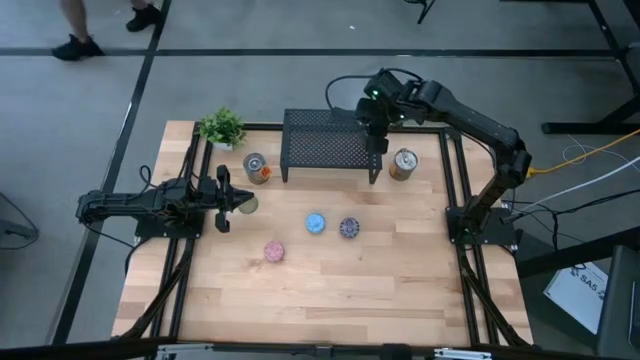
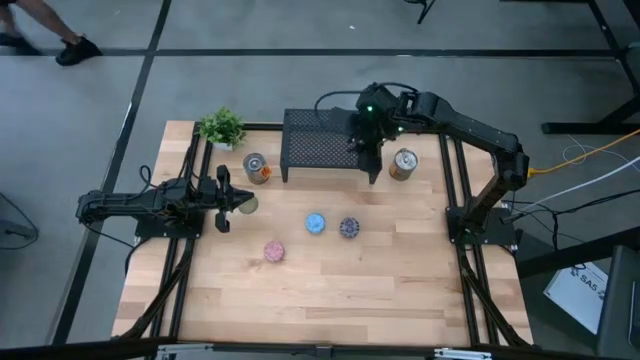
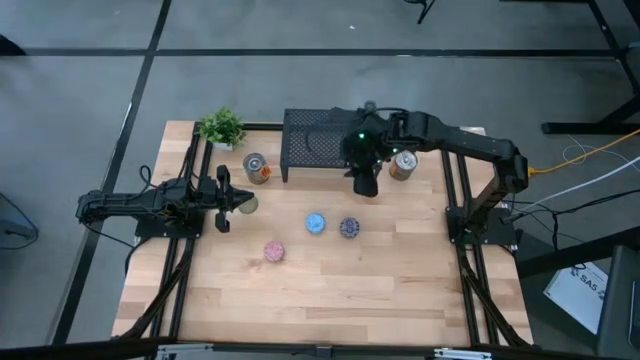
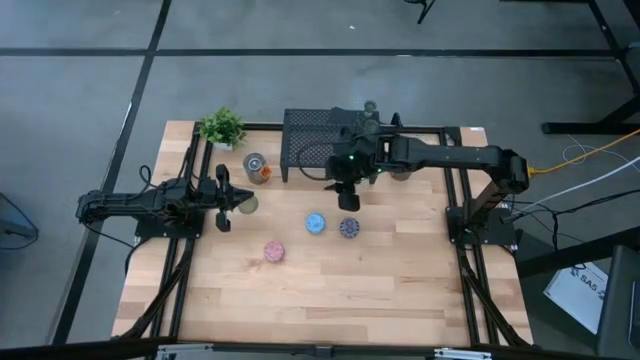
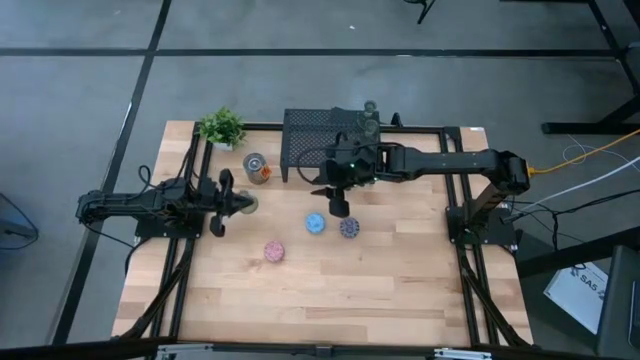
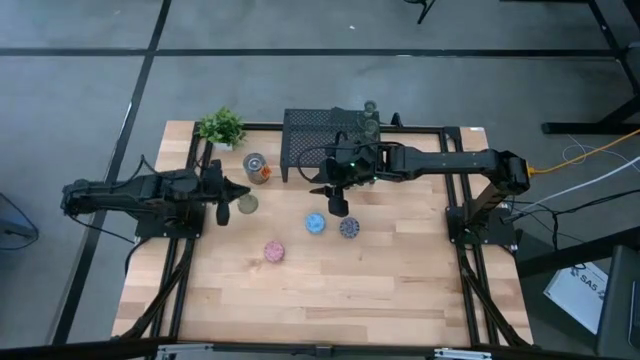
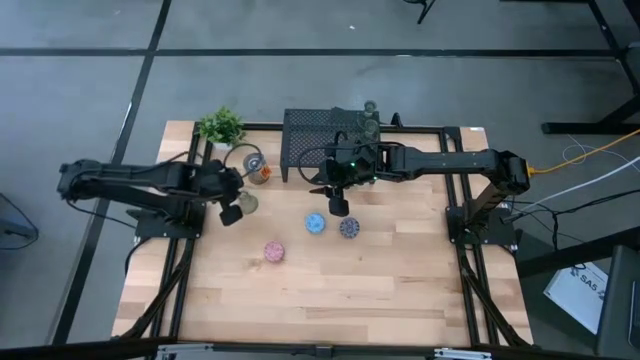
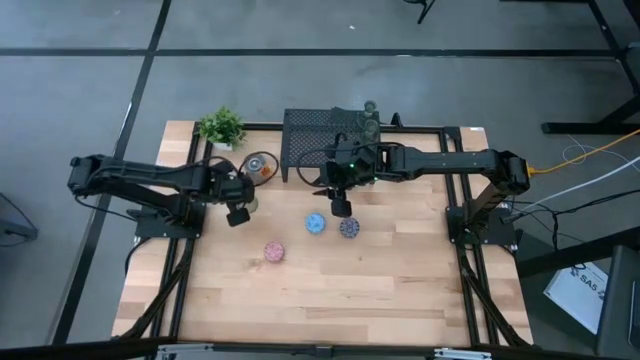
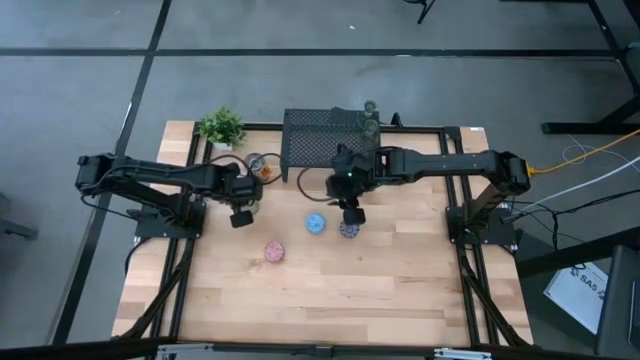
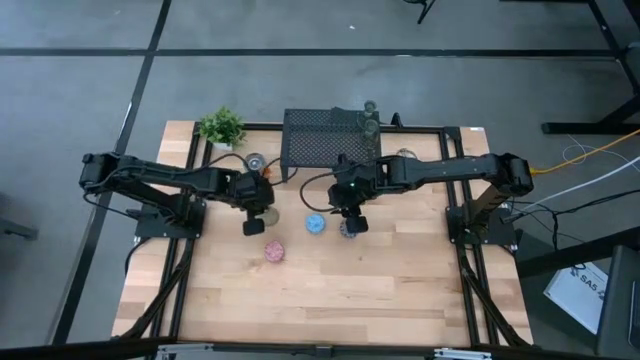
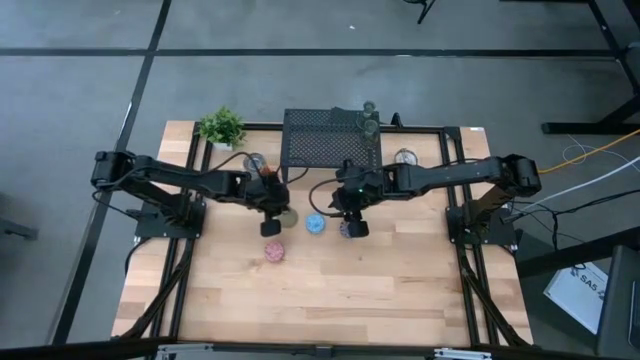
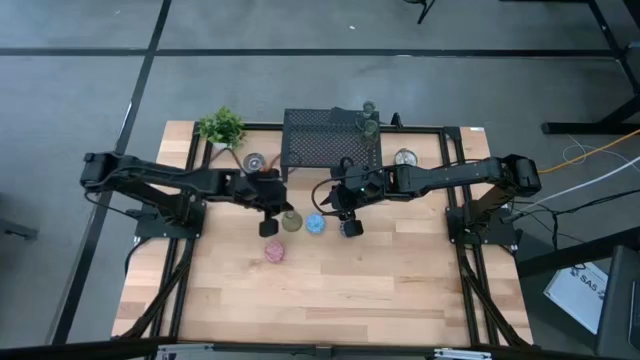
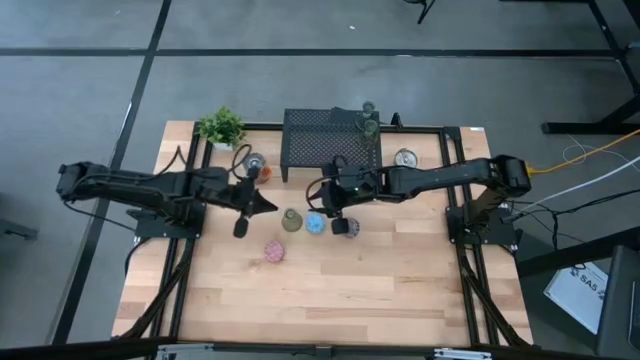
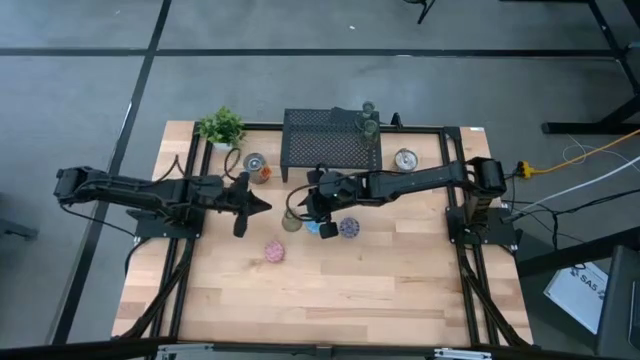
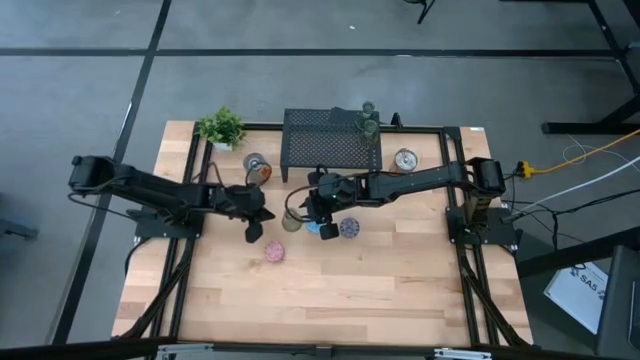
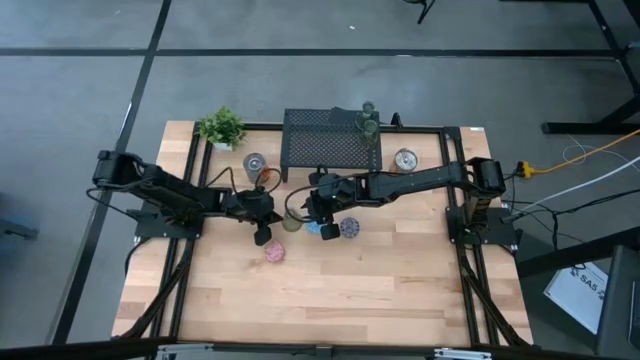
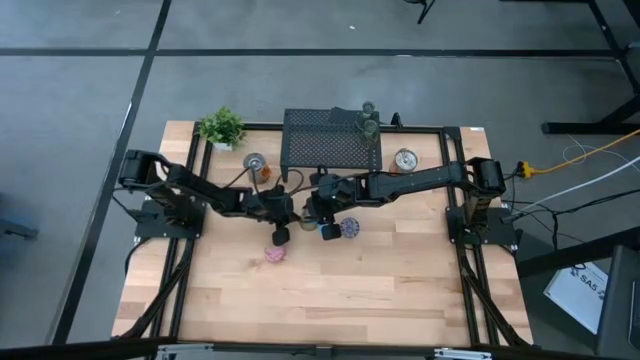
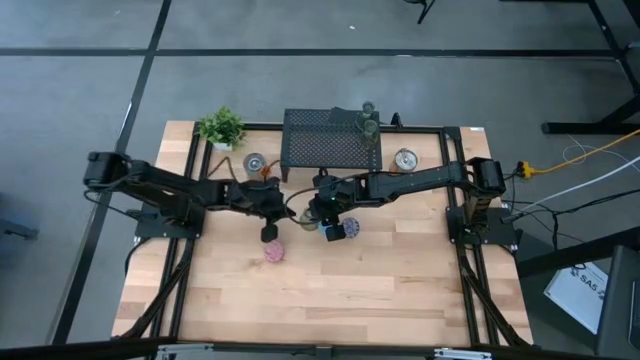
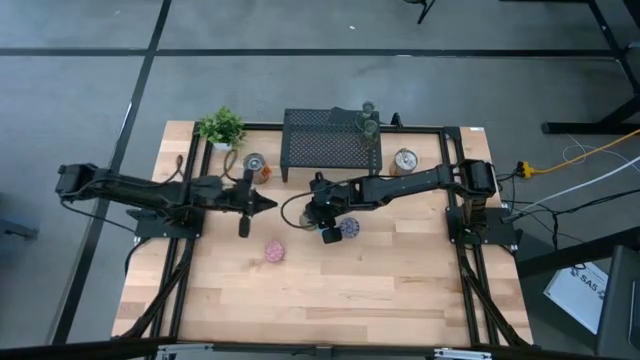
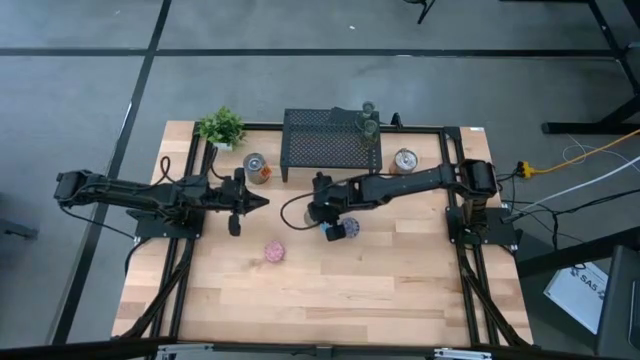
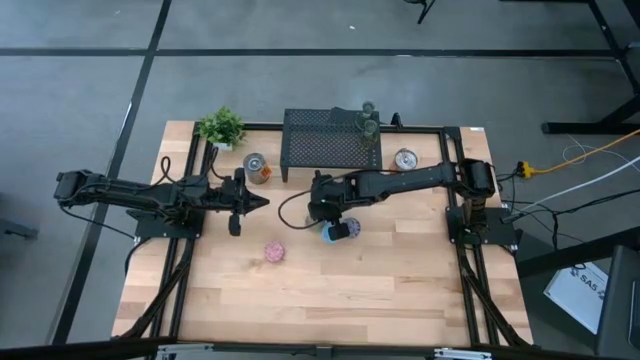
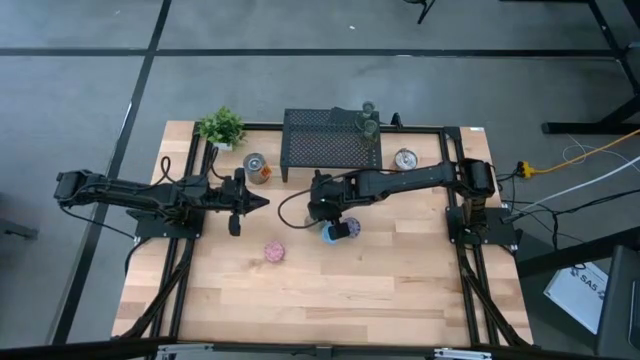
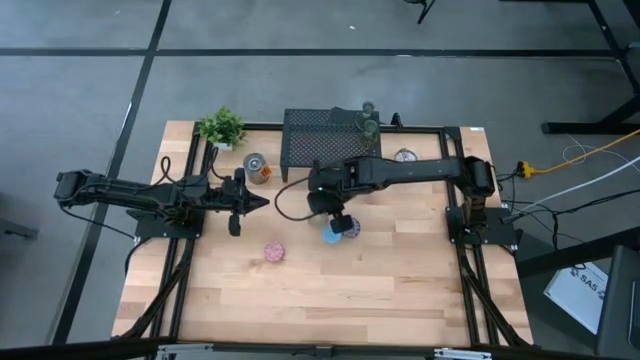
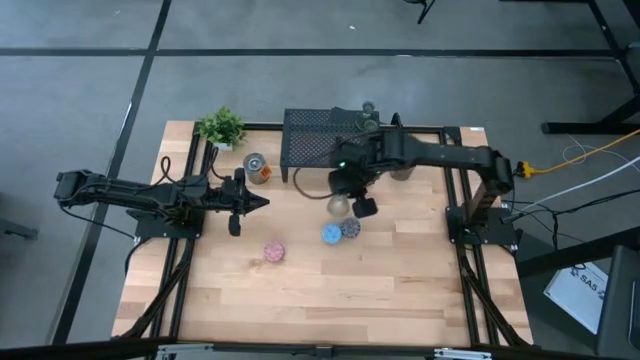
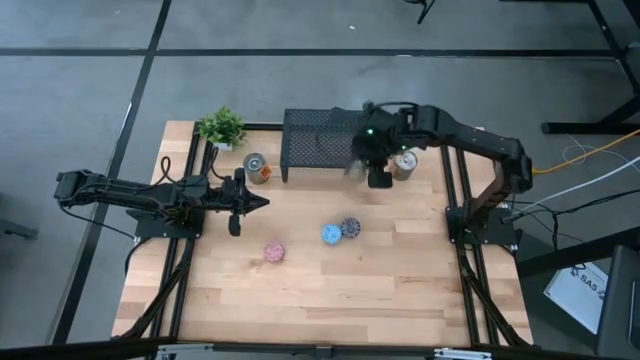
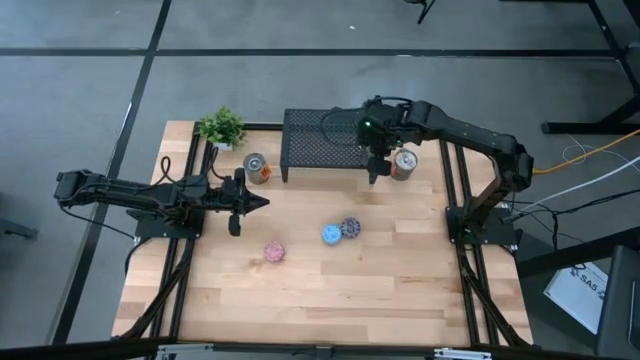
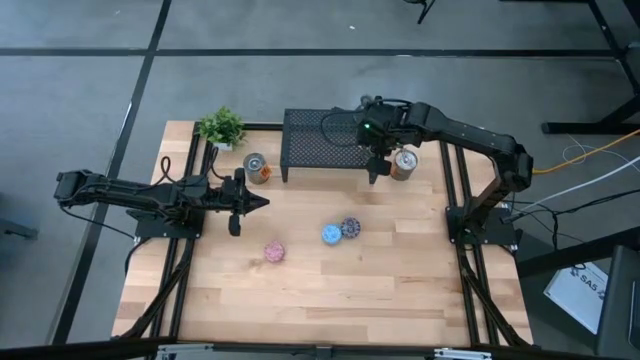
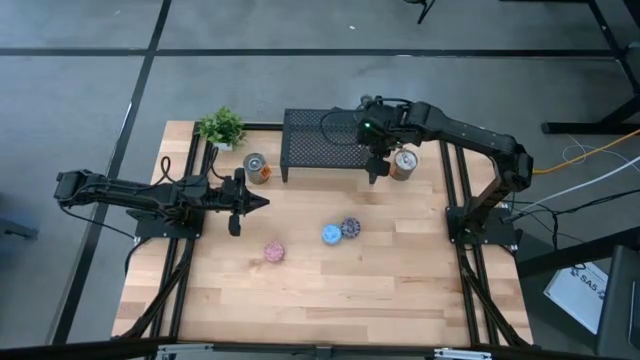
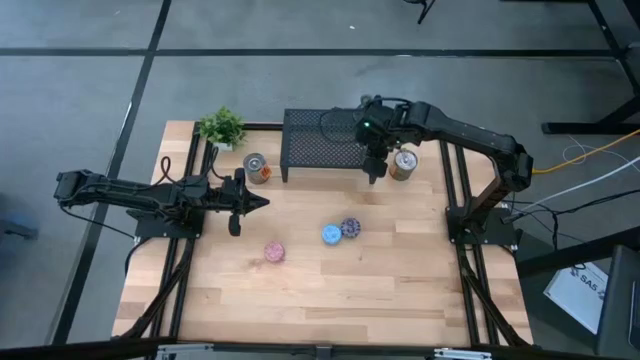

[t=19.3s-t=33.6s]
Task: Pick & Place candle stick holders
Put the green glass candle holder on the shelf aligned with the other green glass candle holders

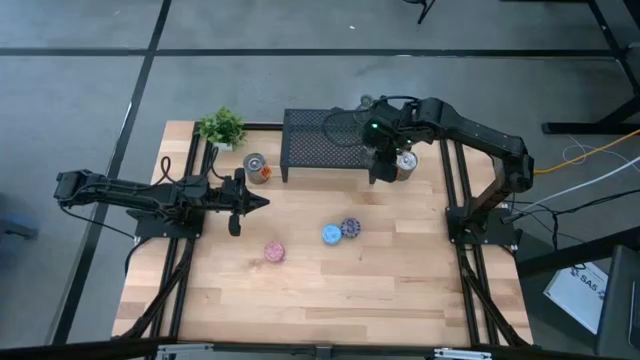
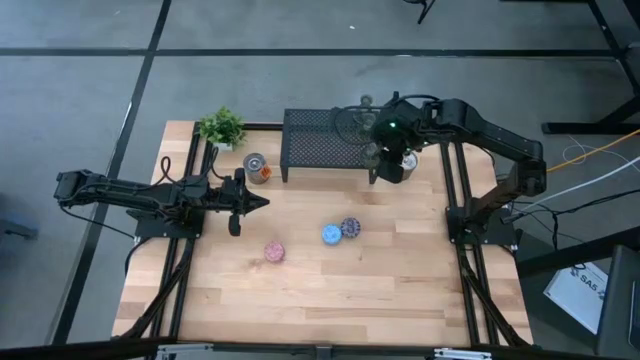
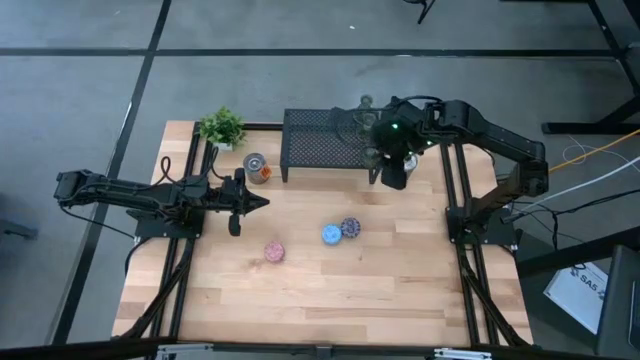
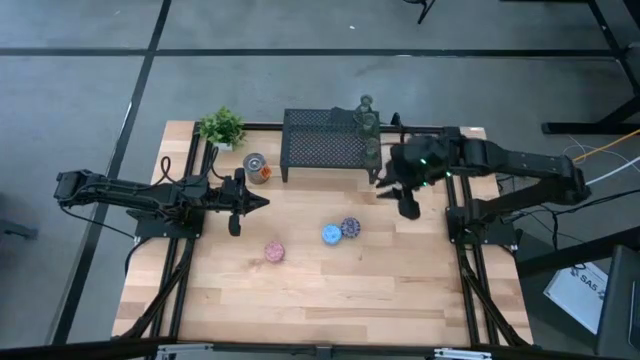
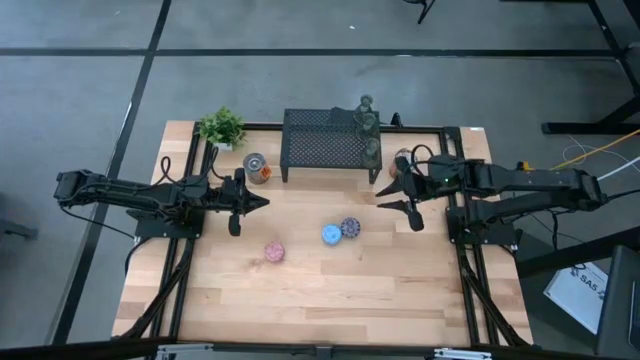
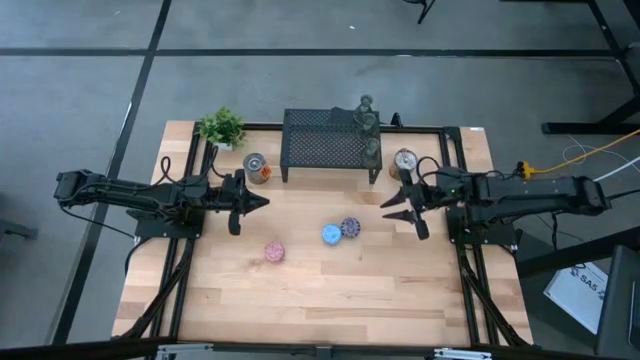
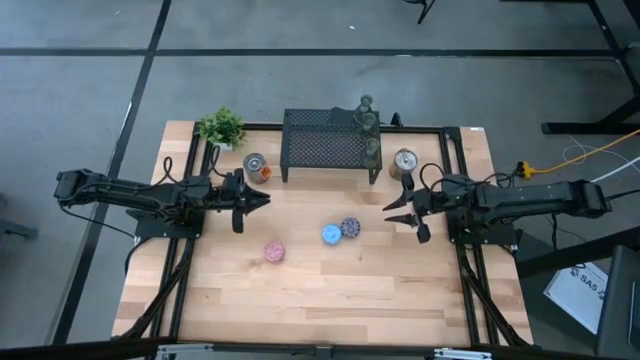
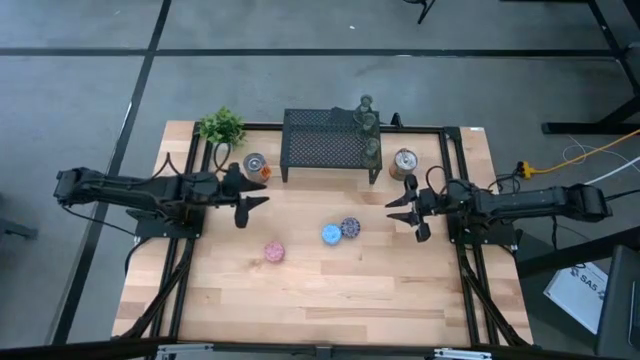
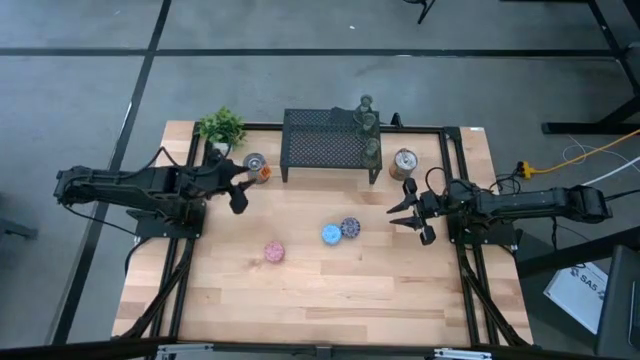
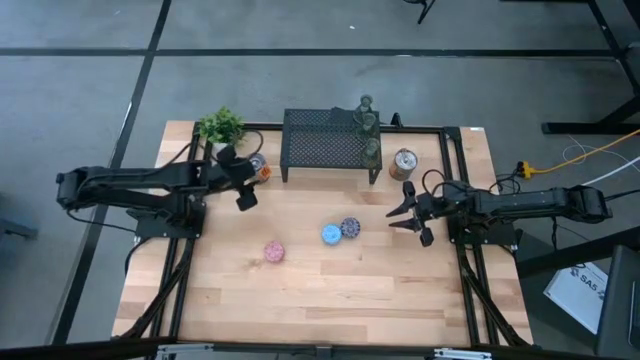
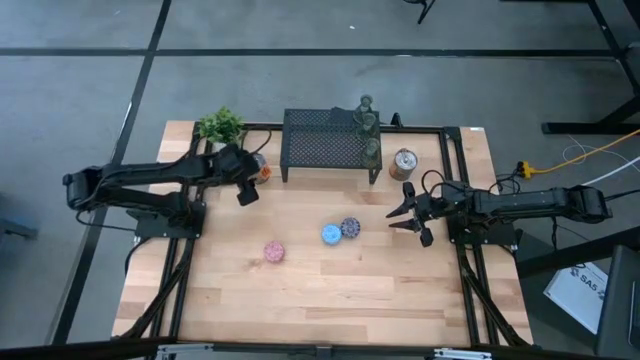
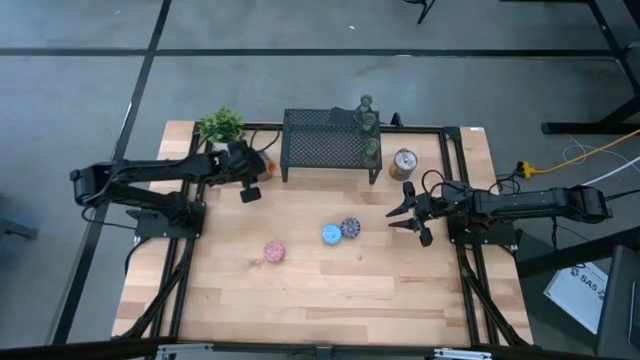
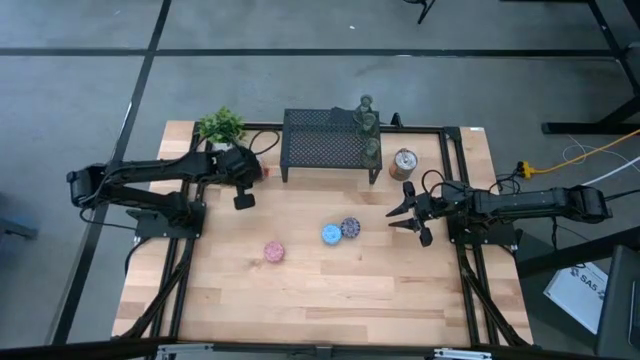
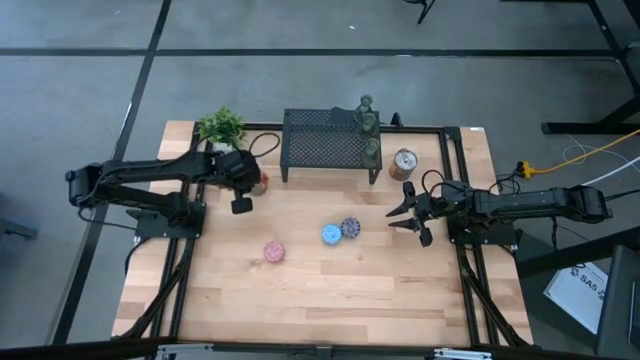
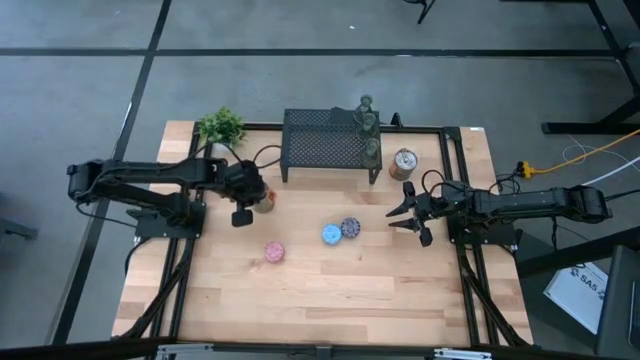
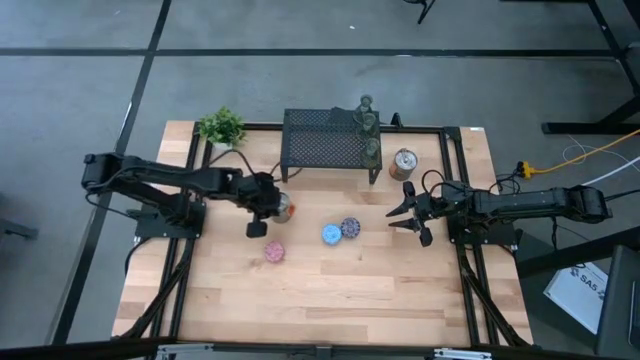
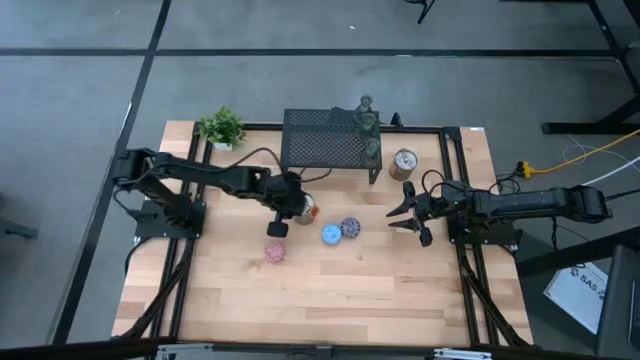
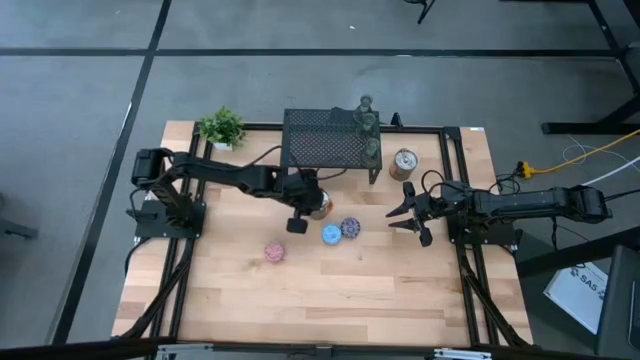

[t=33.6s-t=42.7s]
Move the left silver scented candle to the middle of the table
